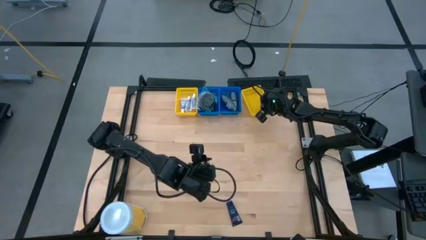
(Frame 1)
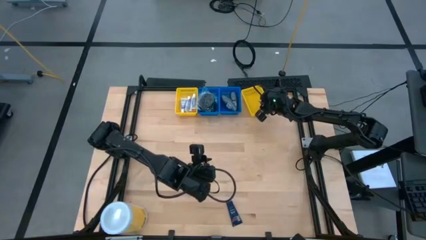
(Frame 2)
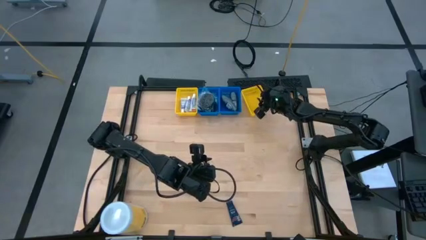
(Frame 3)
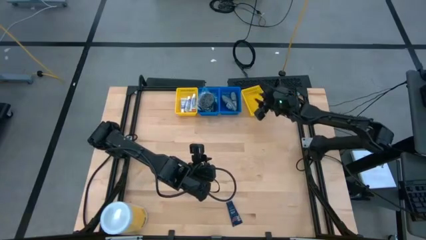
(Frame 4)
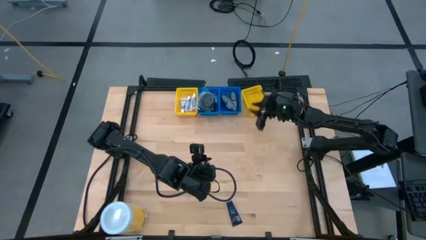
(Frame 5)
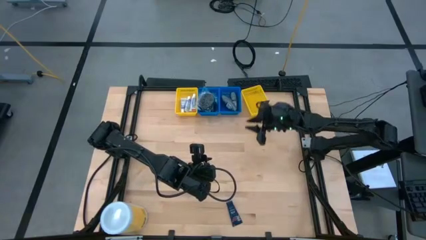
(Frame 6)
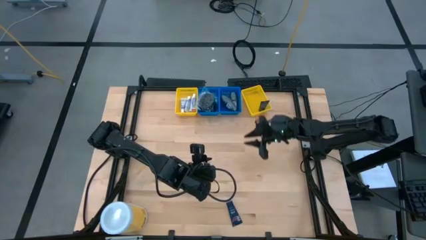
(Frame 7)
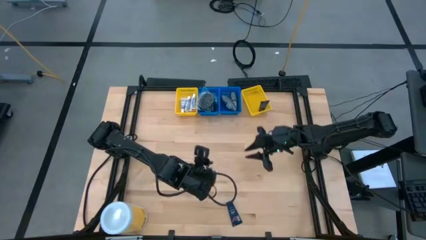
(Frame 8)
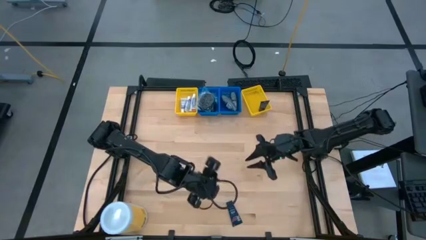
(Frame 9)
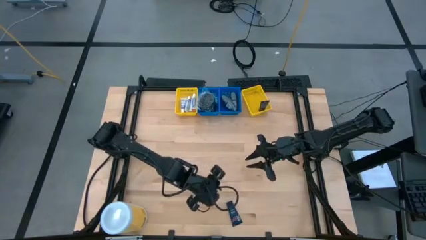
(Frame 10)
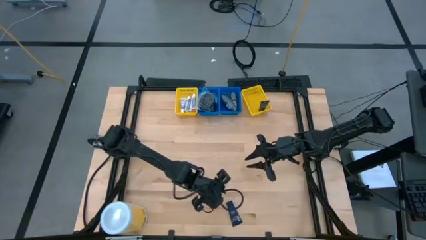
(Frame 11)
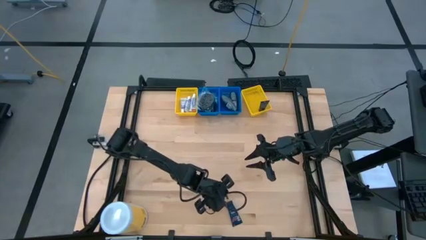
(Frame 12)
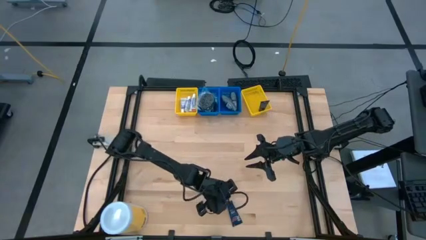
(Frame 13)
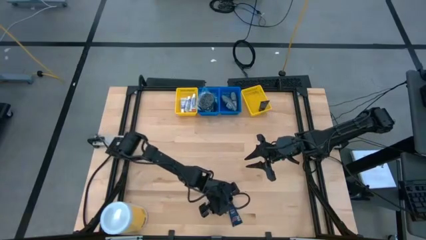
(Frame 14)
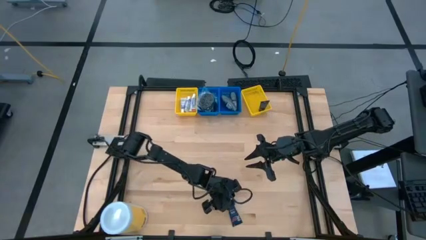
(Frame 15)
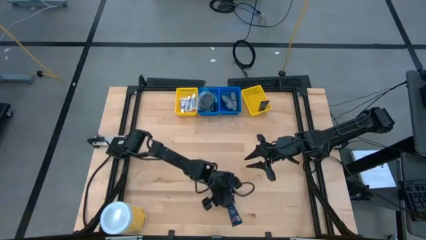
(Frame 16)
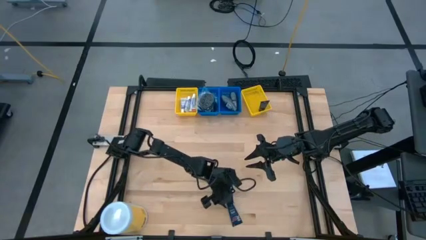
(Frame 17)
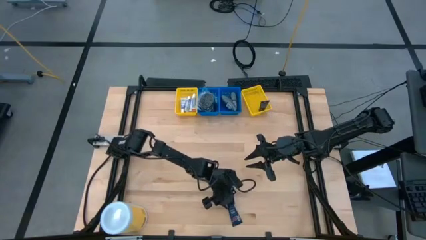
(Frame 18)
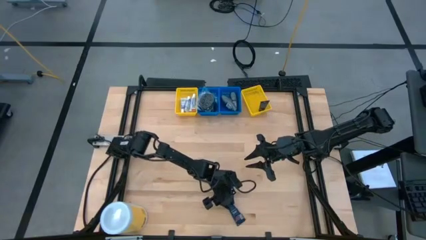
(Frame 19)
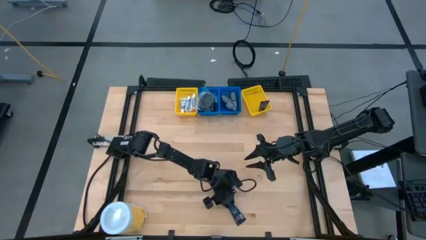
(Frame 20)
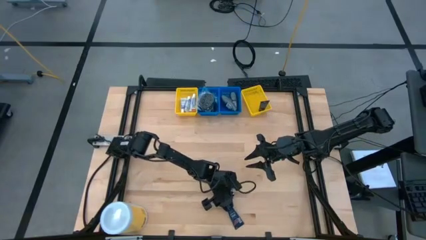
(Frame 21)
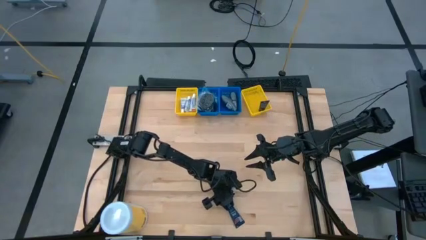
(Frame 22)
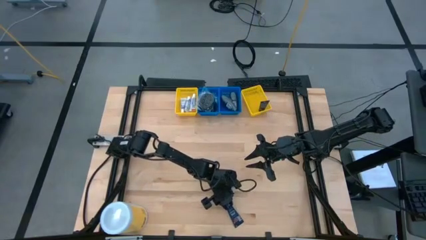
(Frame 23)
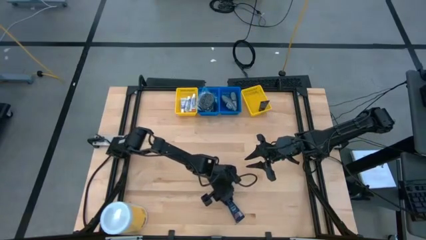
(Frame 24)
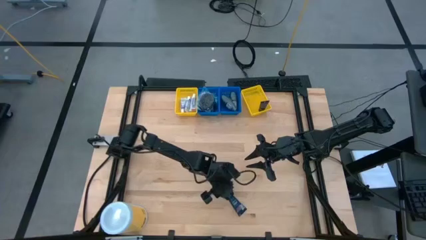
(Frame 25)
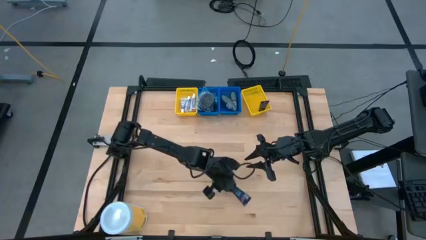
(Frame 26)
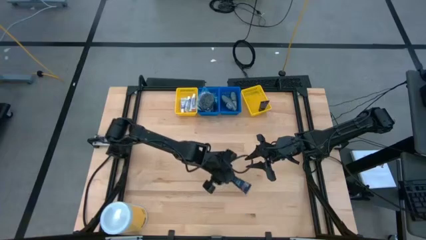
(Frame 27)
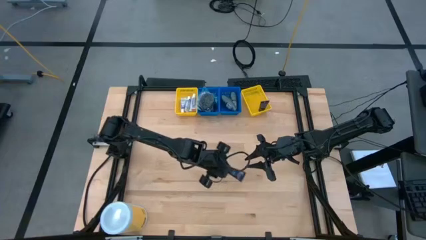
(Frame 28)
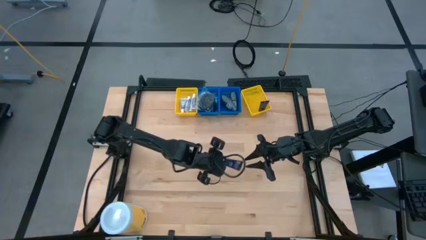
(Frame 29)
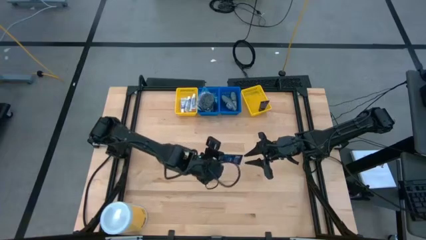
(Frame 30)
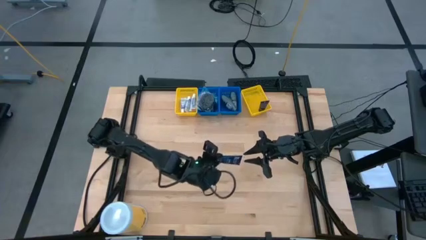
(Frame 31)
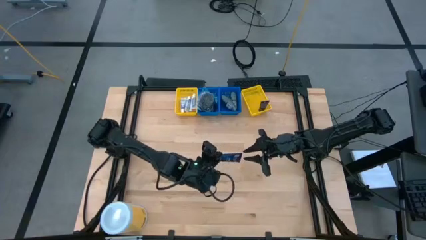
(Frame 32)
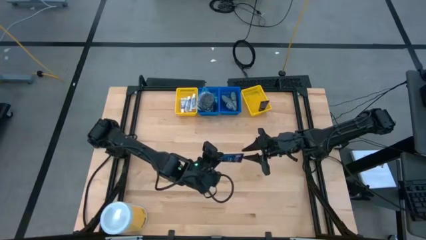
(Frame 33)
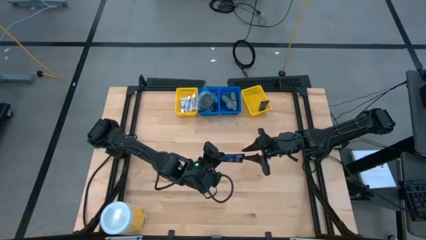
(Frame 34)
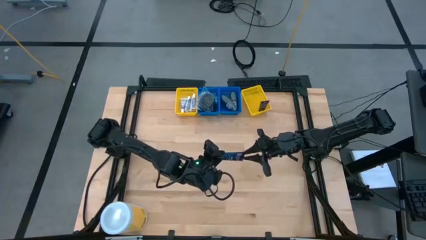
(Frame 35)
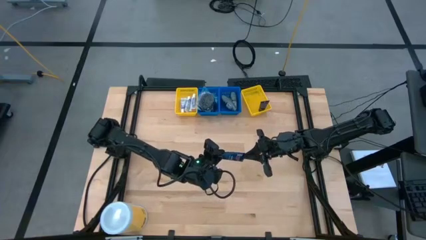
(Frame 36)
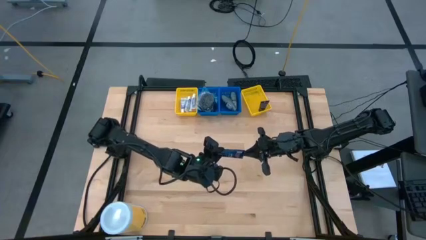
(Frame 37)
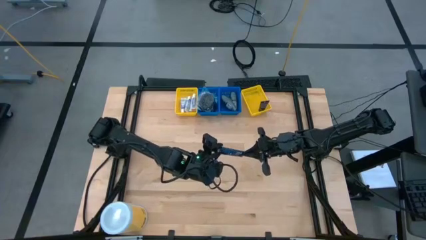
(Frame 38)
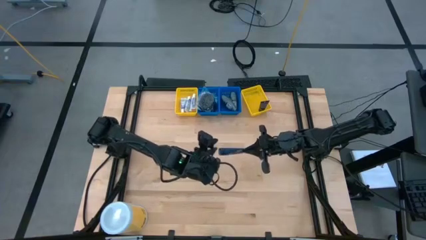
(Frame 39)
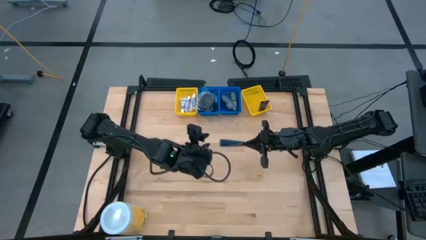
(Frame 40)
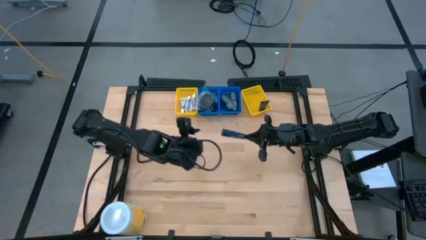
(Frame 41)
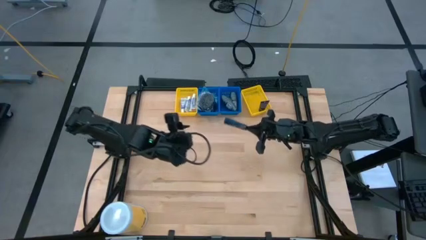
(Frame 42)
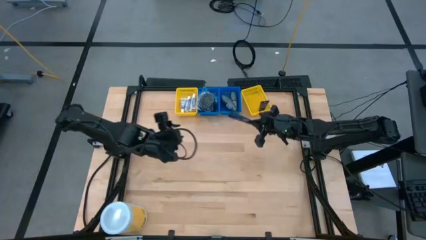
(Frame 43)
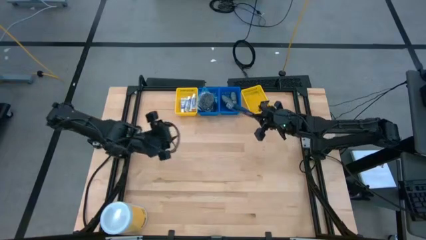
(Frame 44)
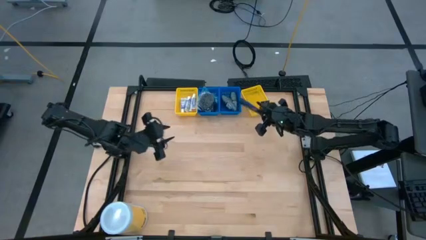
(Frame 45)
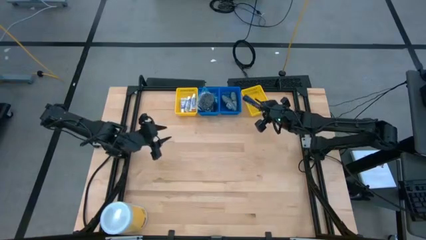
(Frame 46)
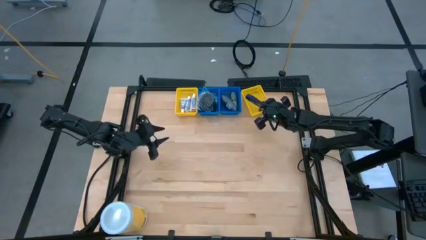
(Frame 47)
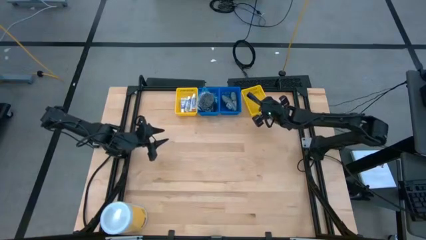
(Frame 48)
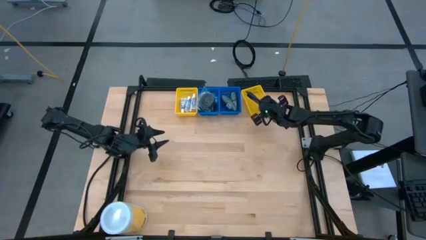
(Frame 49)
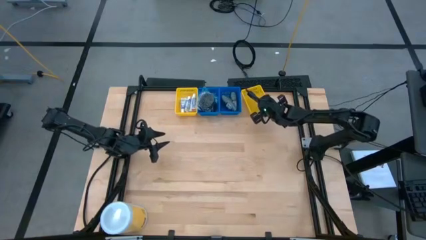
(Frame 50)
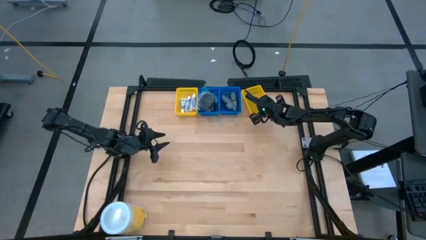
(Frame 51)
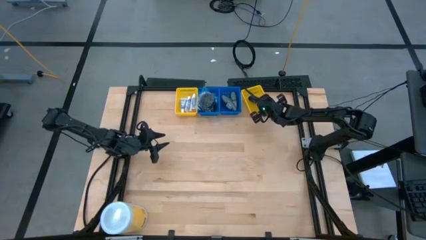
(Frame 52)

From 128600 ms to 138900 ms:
Task: Pick & Place Travel size toiletries
Put the shave cream into the right yellow bin

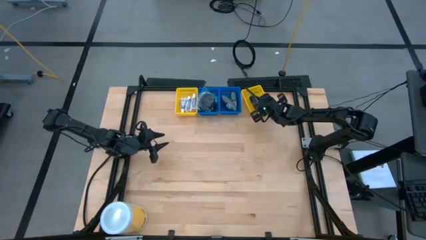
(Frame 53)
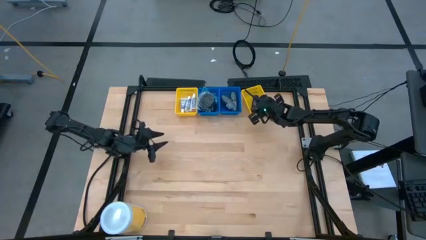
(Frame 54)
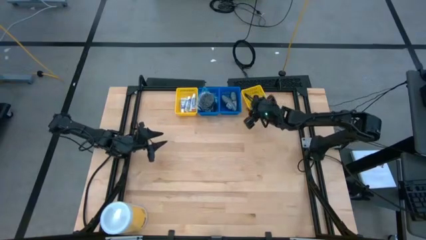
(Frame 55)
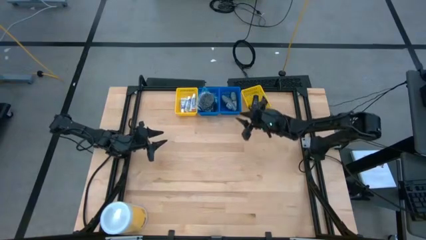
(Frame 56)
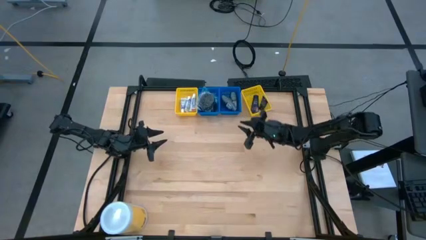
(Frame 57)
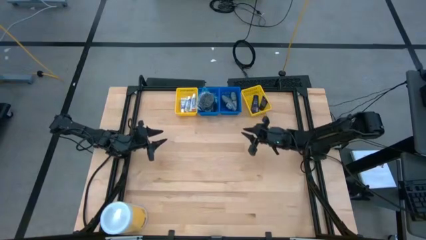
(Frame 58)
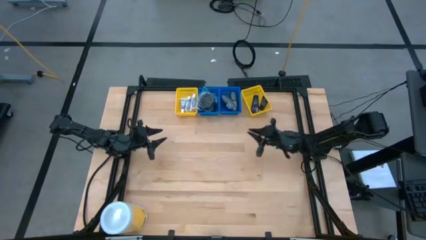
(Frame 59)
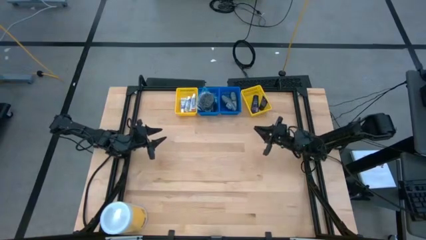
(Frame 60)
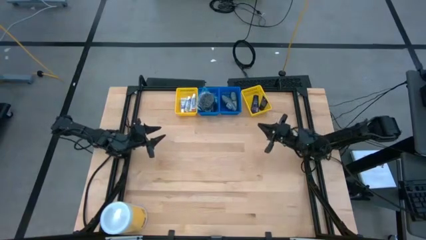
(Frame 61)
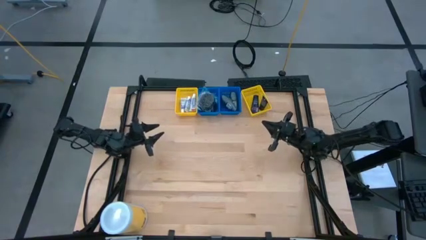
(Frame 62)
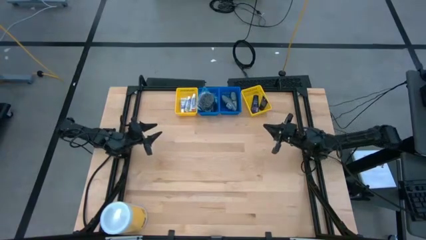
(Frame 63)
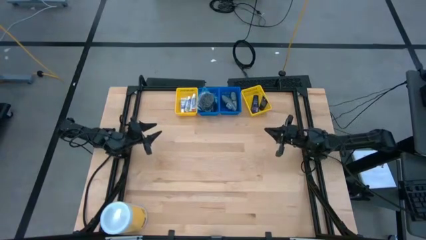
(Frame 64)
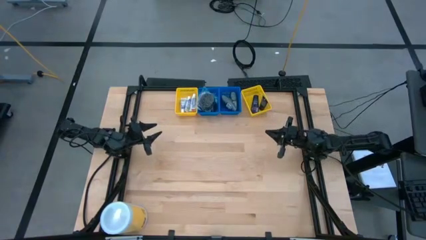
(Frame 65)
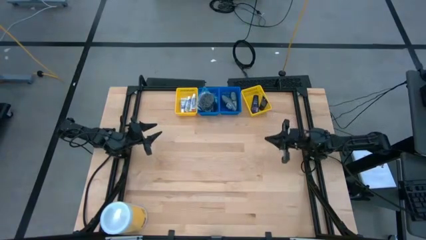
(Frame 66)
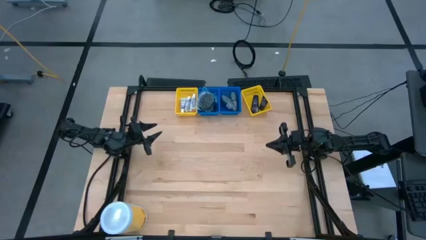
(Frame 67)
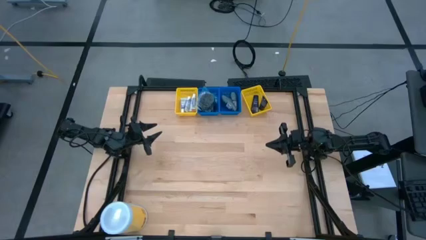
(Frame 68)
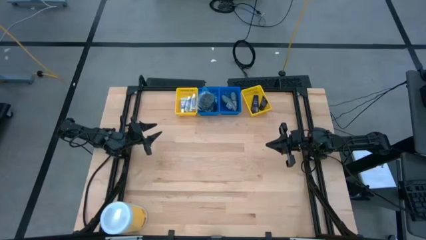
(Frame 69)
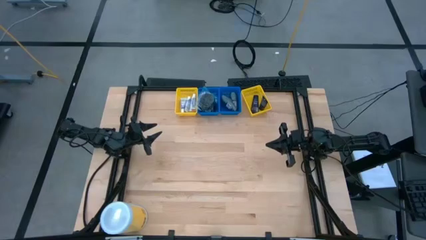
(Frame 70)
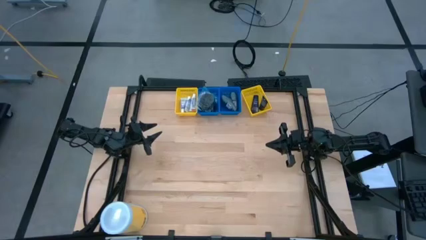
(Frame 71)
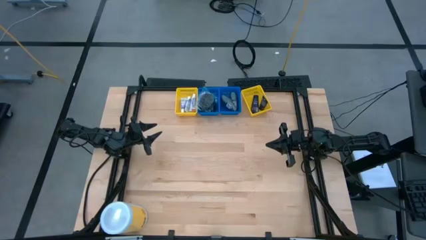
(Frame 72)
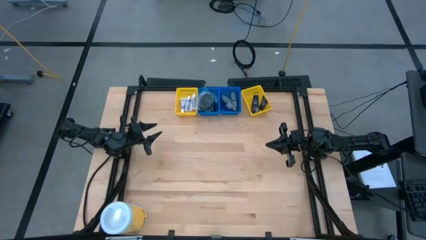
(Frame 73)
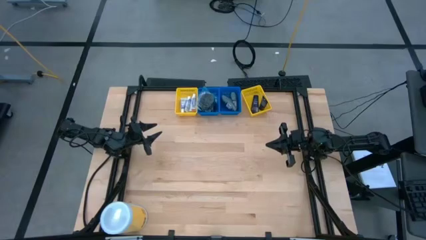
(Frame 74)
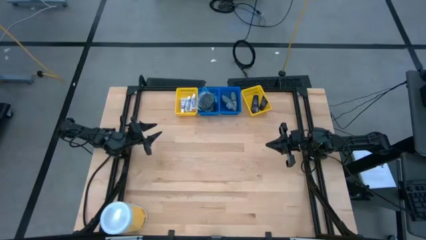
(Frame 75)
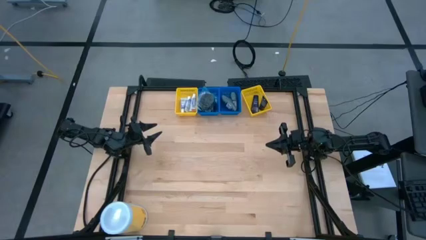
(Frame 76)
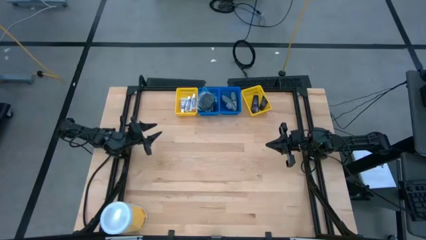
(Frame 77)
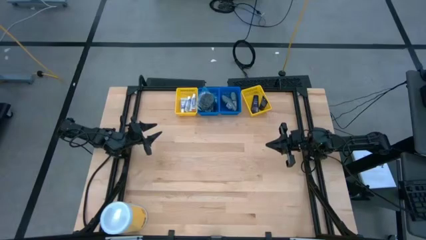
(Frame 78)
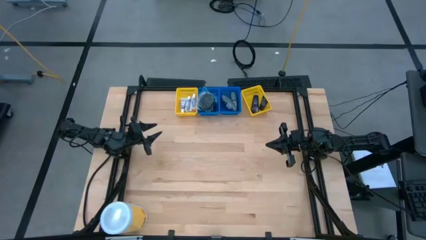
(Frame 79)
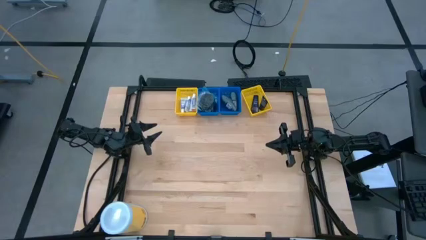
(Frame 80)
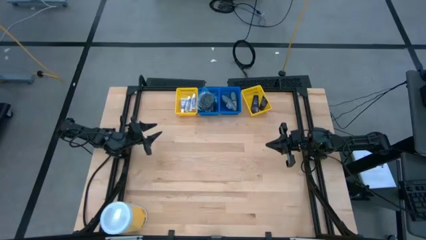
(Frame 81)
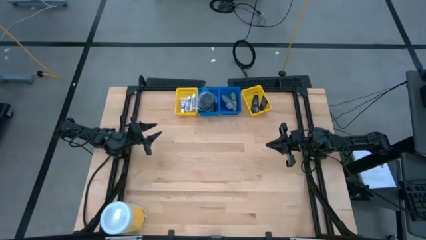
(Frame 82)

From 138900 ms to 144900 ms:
Return to Home Position
